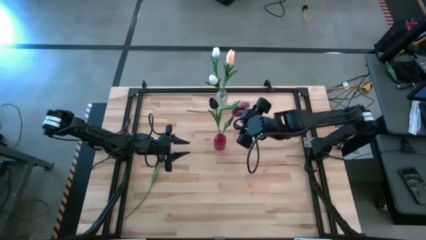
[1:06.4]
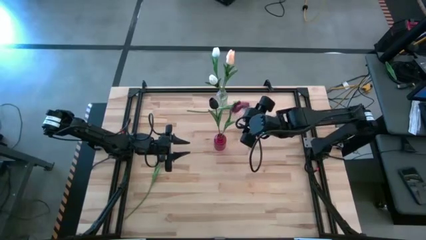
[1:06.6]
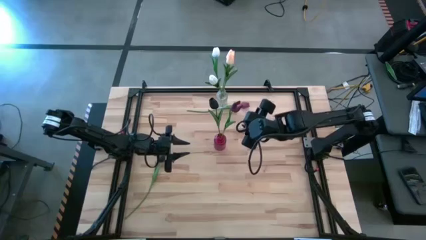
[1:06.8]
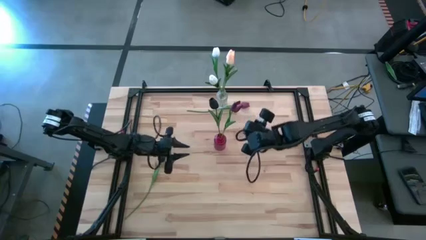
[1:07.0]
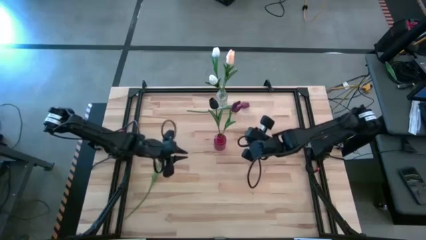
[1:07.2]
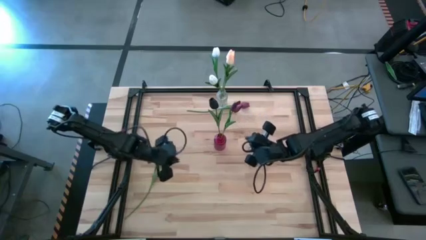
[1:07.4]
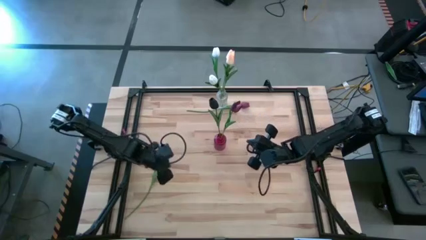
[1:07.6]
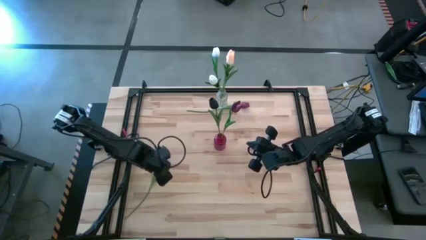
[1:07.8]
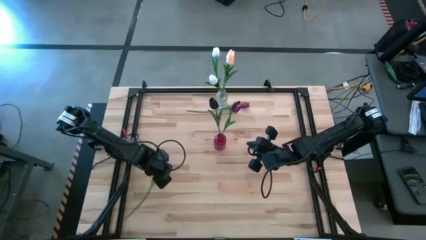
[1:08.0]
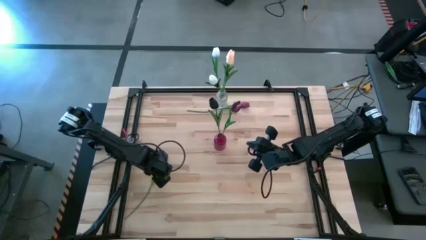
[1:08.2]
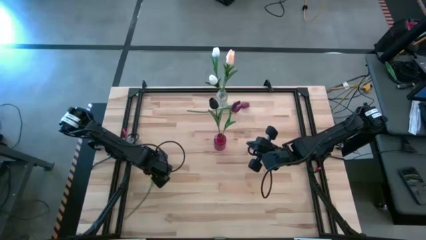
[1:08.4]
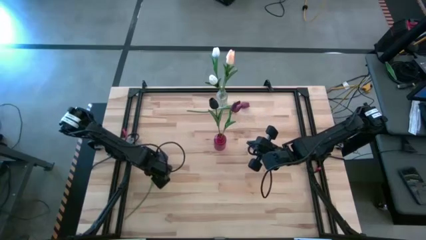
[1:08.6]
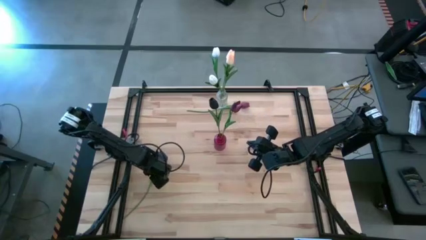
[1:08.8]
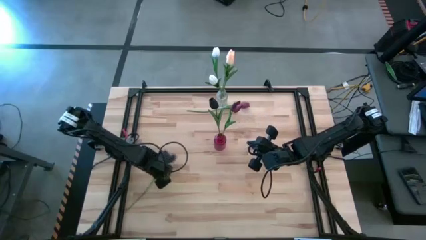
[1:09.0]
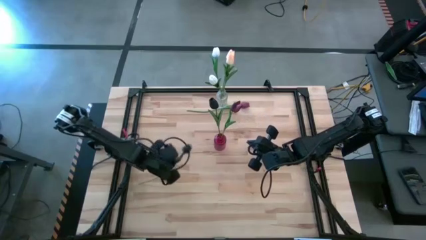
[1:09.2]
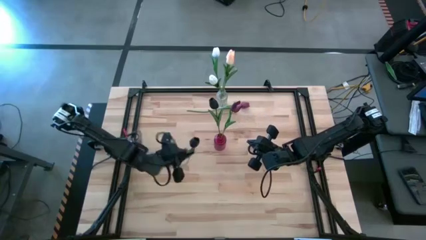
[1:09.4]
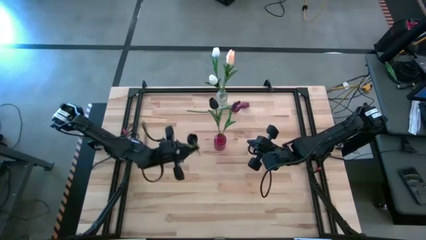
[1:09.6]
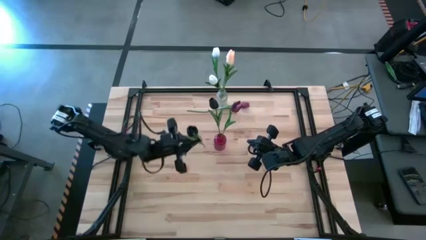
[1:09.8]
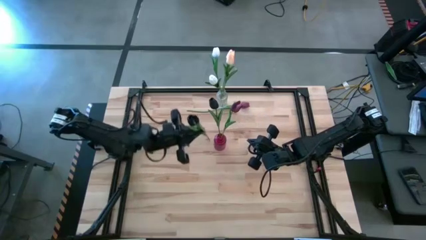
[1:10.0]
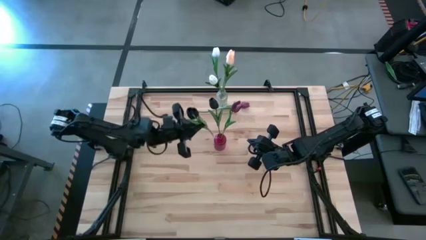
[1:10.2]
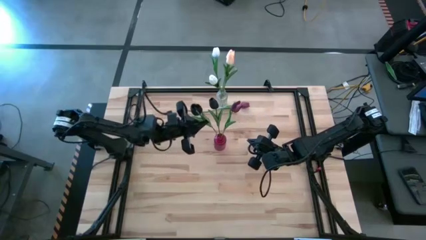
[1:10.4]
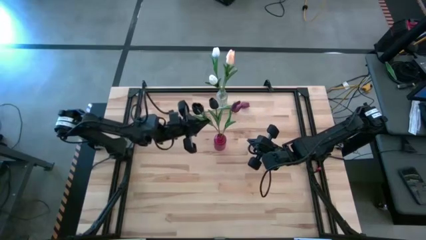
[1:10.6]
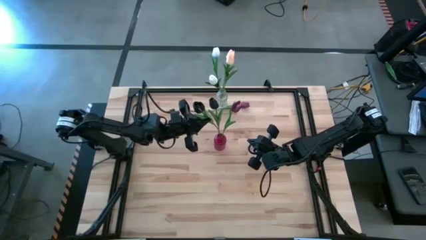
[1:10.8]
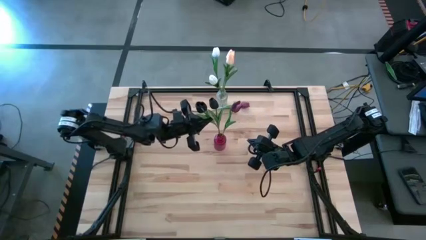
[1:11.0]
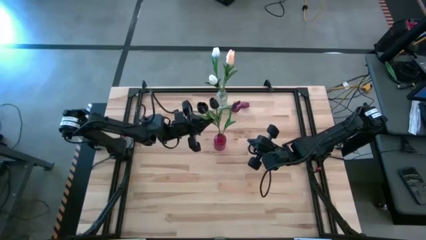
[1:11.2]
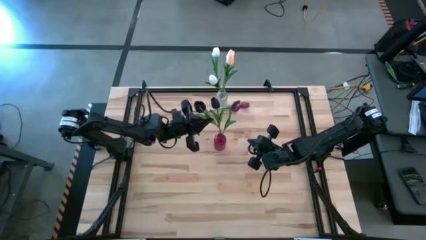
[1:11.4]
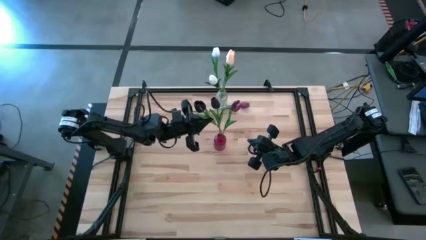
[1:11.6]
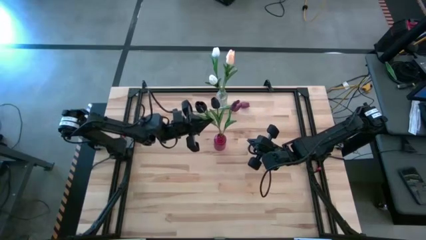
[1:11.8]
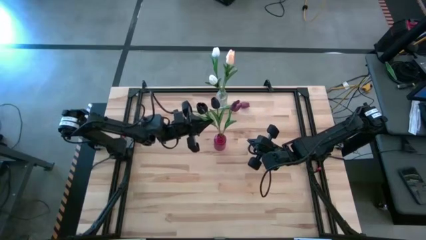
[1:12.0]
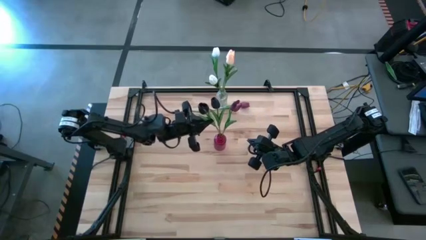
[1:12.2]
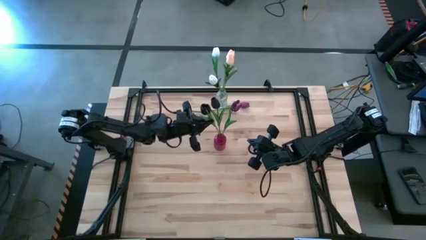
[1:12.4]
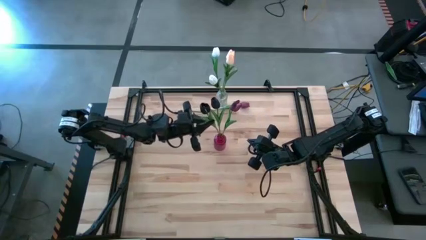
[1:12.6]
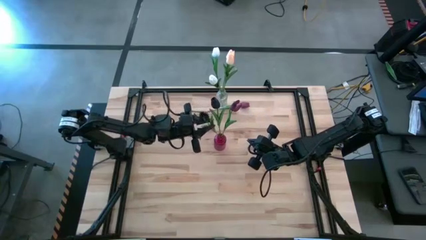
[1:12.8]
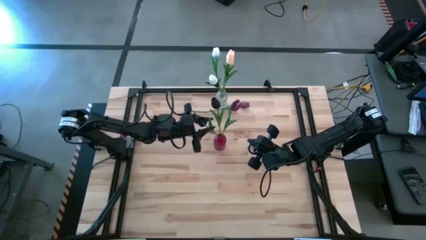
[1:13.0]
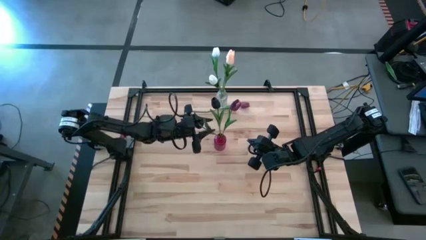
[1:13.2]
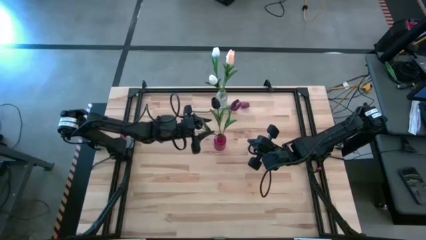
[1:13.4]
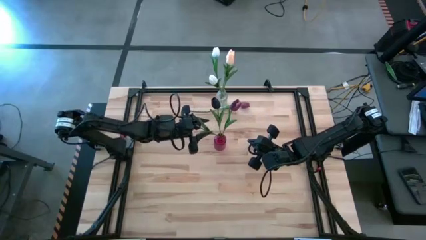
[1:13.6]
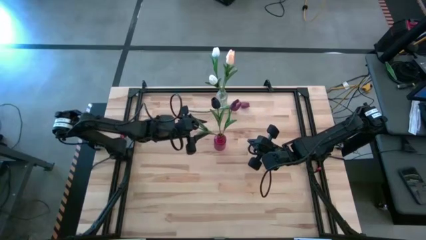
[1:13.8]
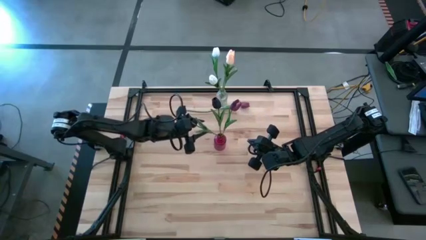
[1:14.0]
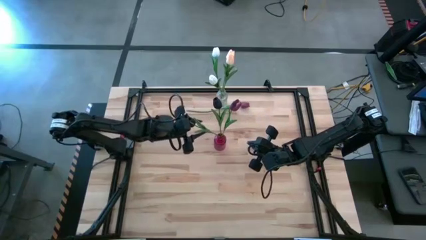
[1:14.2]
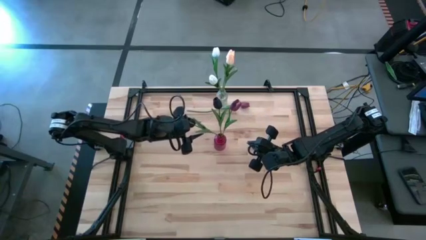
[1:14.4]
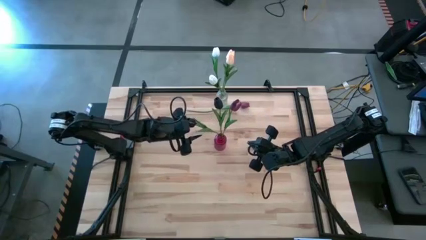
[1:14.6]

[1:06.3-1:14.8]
Task: Sort flowers into vase by color
Put the black flower into the red vase

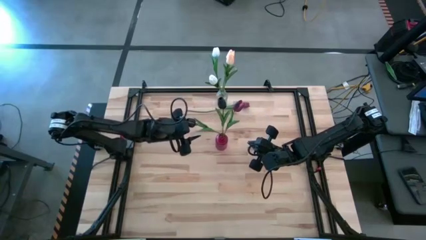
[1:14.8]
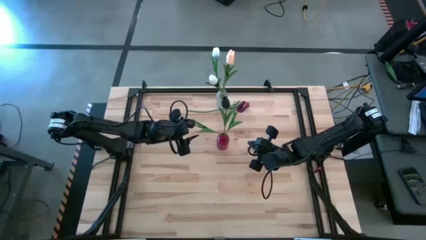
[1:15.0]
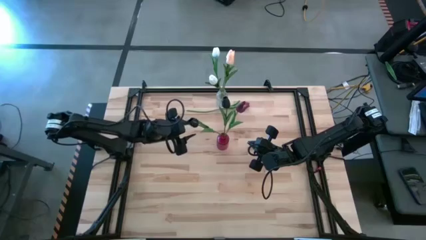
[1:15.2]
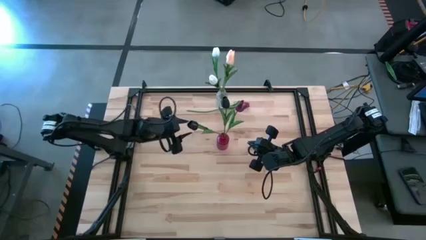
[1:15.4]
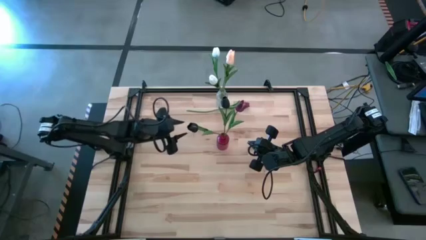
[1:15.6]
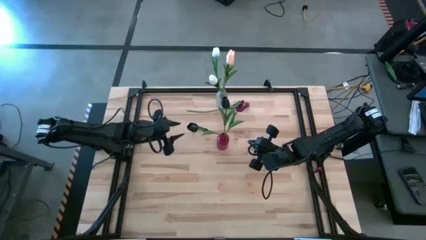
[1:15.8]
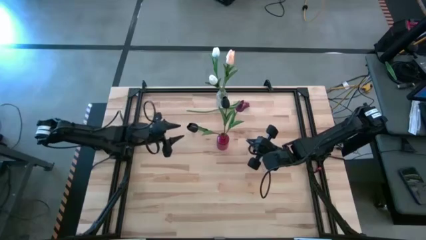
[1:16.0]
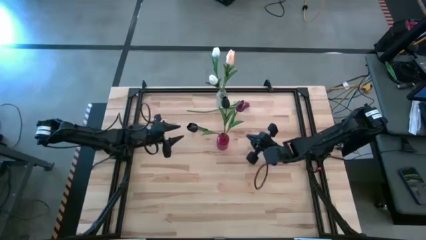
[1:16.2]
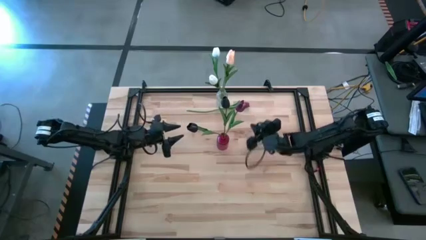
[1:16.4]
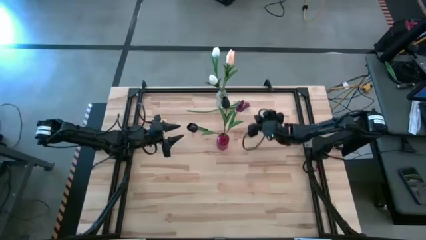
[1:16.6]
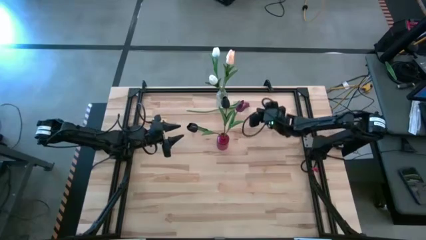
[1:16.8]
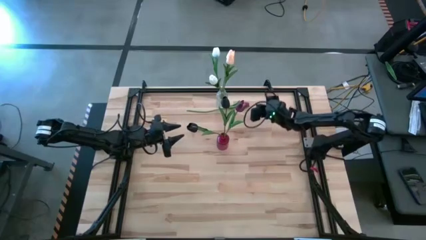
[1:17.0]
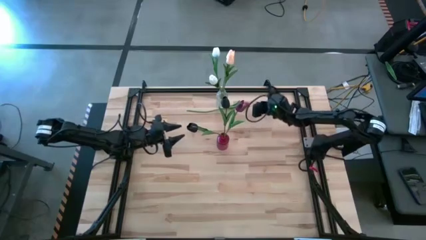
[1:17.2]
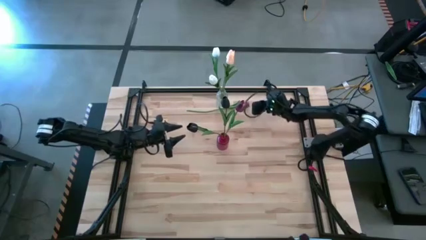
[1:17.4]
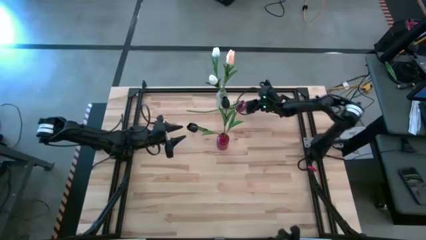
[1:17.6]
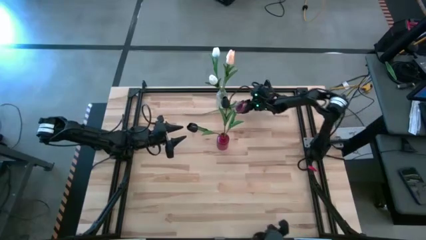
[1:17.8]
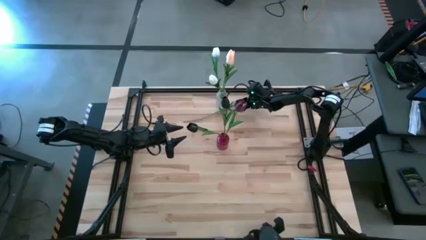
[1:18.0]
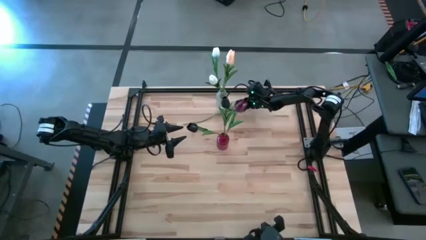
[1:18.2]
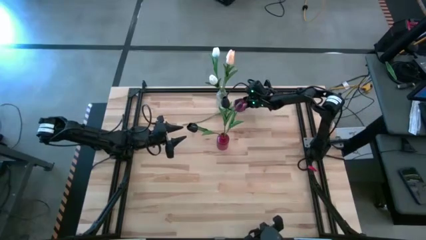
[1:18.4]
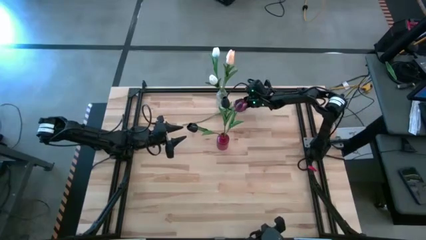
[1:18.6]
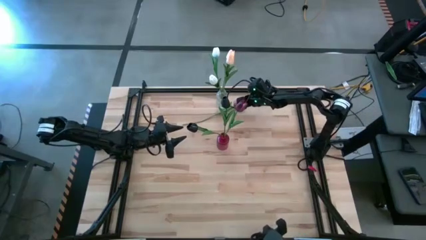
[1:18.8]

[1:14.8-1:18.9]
Put the red flower into the red vase

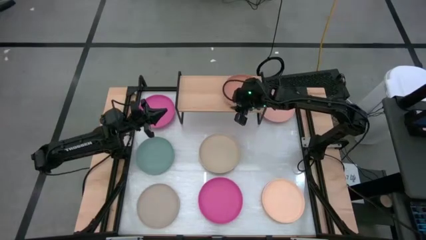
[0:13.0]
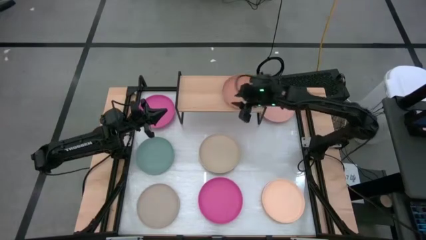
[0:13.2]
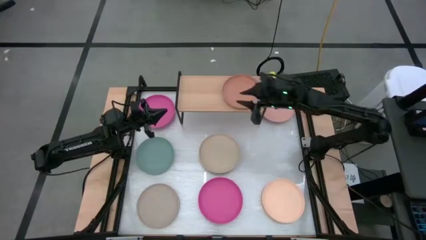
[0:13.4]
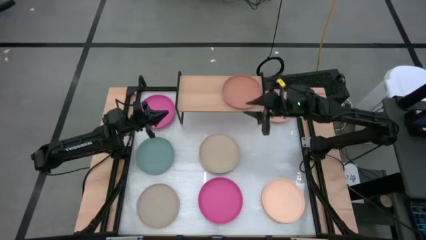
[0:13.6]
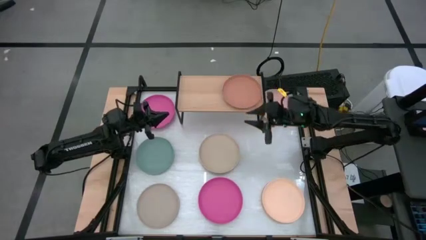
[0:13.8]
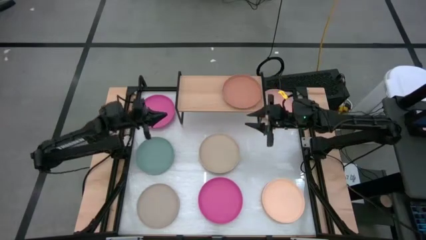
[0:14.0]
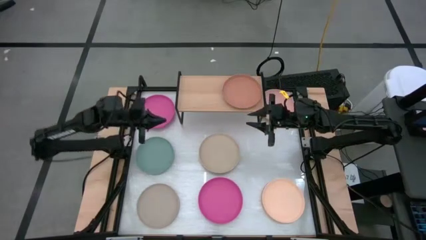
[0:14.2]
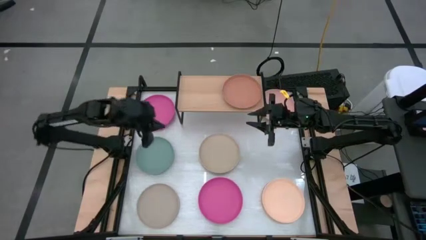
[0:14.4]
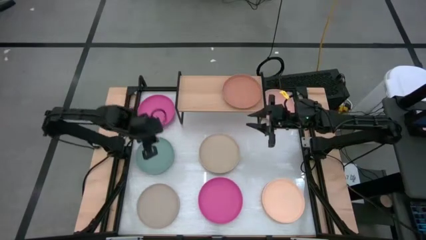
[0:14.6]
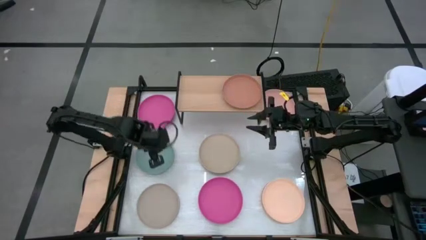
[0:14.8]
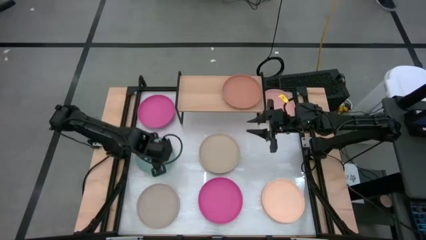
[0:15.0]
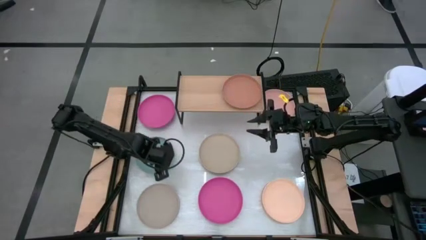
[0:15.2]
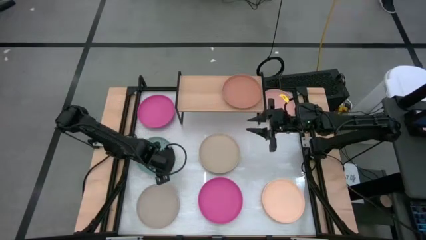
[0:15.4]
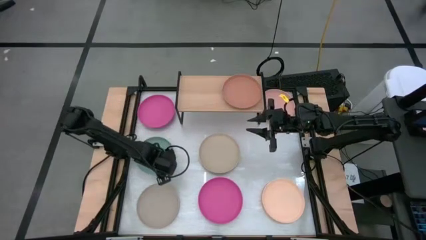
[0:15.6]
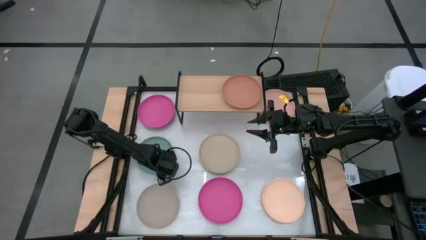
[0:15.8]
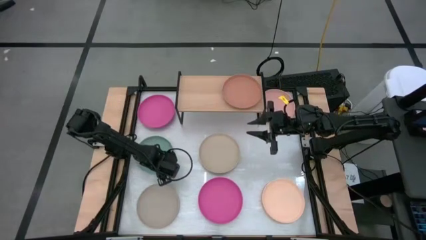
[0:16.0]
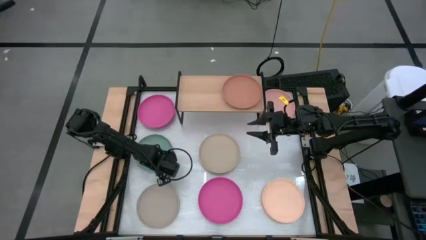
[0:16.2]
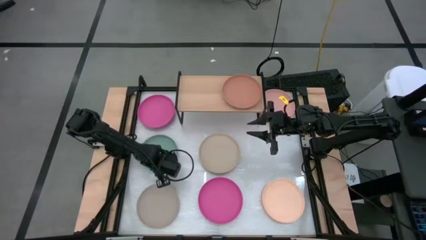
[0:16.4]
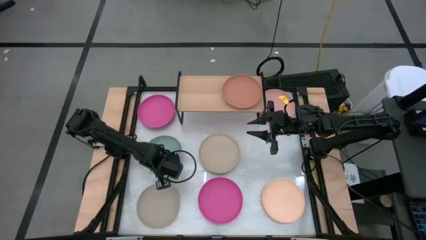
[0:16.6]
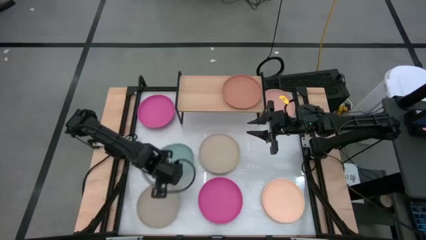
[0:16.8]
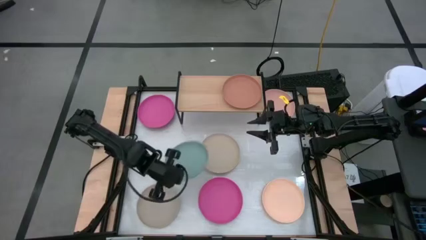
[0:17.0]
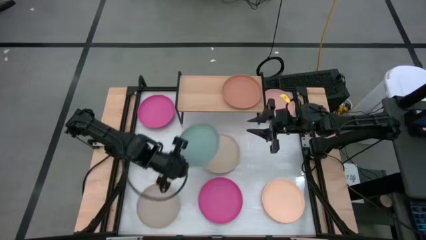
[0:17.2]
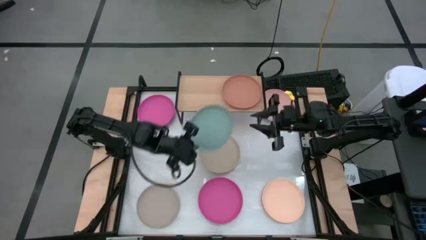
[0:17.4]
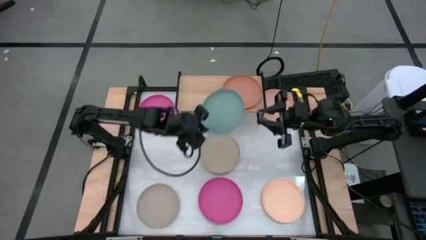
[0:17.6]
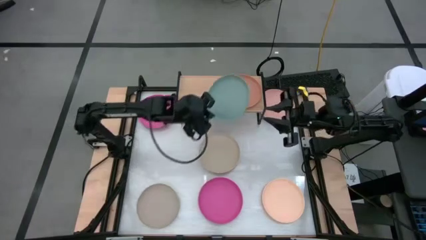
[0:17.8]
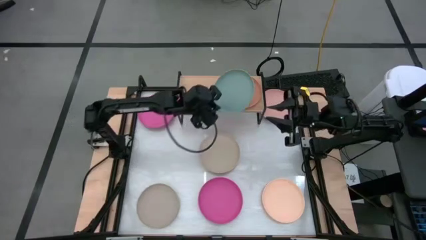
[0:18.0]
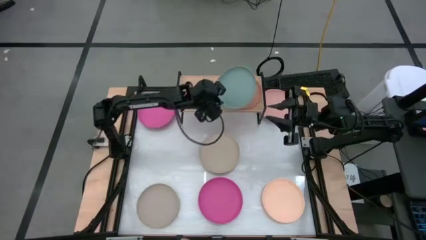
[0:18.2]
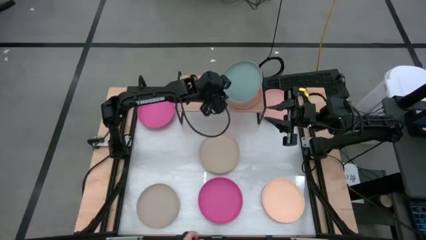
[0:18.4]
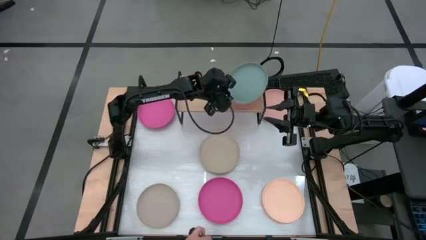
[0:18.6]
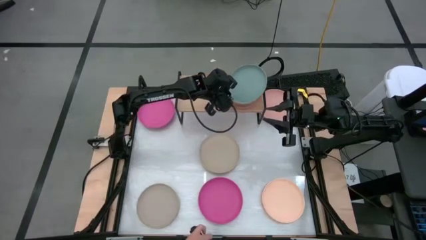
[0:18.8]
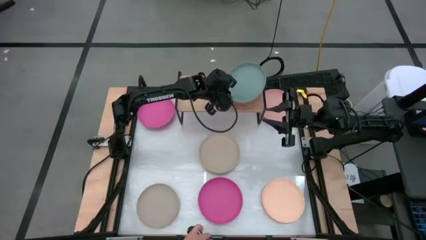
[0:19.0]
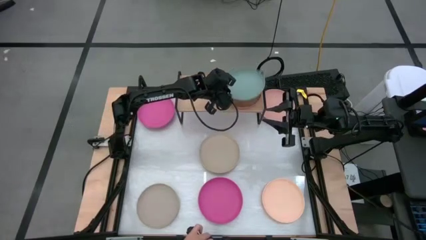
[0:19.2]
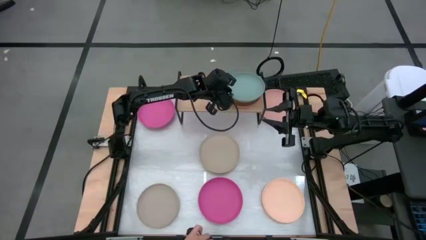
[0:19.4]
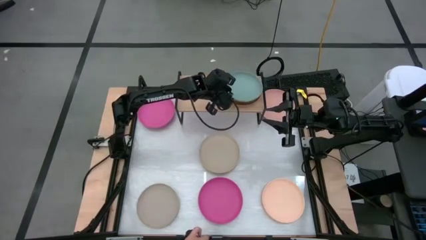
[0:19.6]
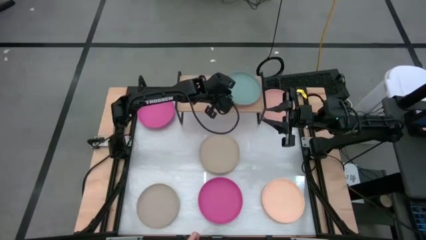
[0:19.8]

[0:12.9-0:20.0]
Task: Place and stack plates onto a shelf
Stack the green plate on top of the brown plate on the shelf
